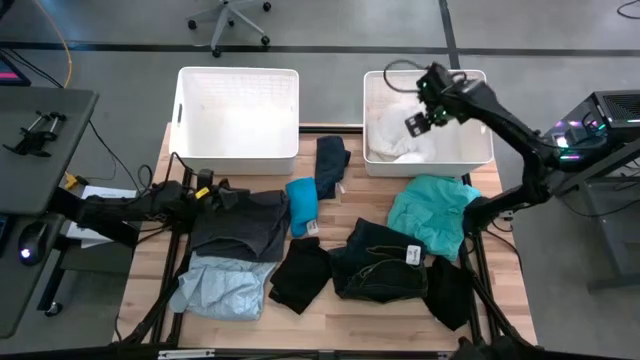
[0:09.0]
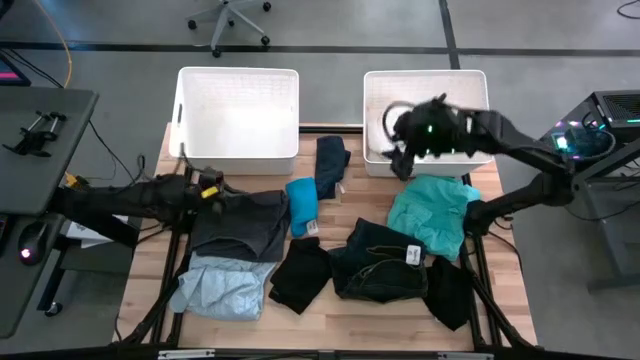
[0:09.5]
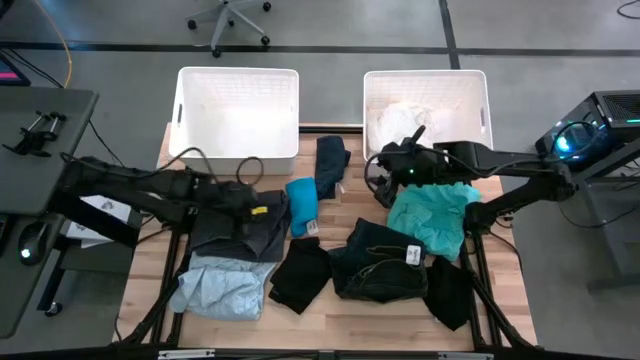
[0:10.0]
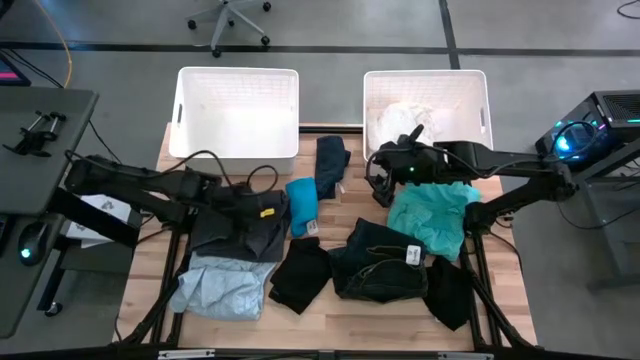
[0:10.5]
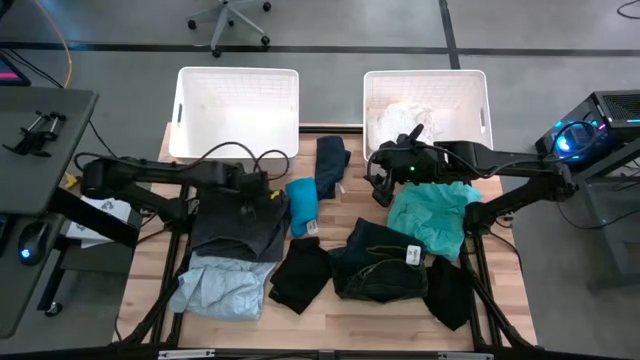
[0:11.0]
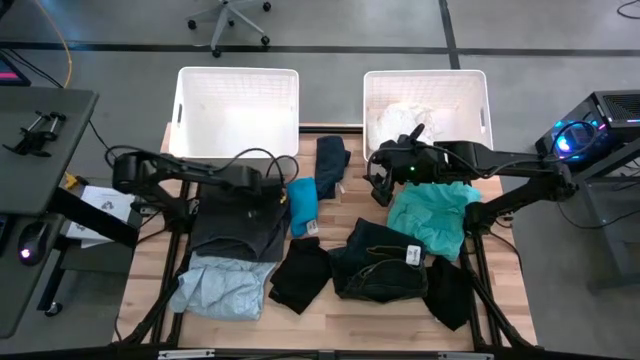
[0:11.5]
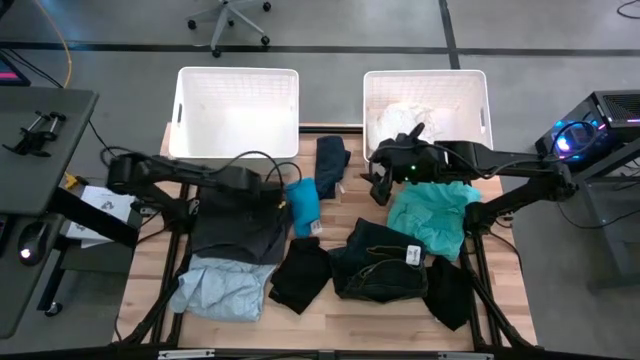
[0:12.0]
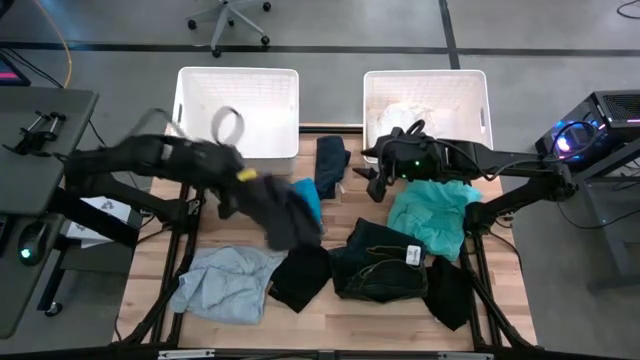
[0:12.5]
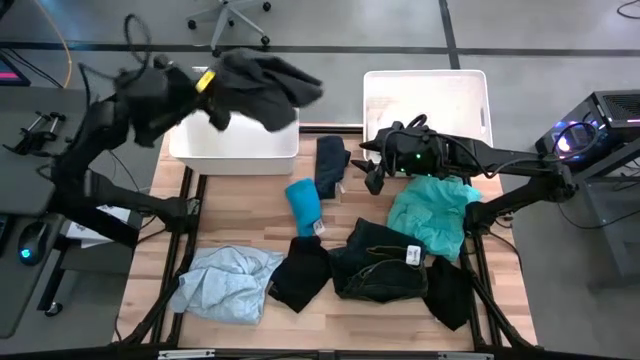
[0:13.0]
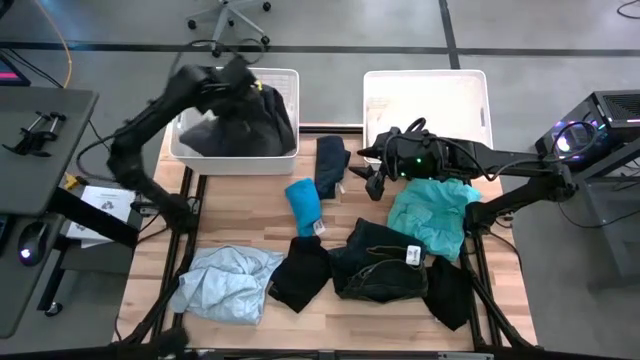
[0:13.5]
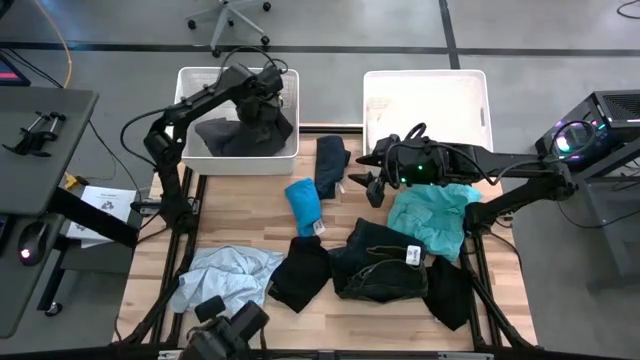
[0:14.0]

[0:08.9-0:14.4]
Task: Sort clothes
Put the black shorts into the left white laundry organizer

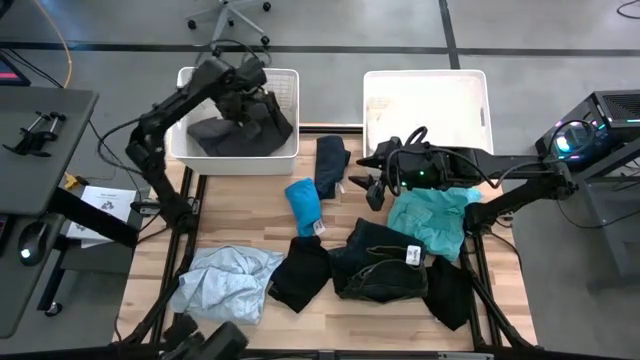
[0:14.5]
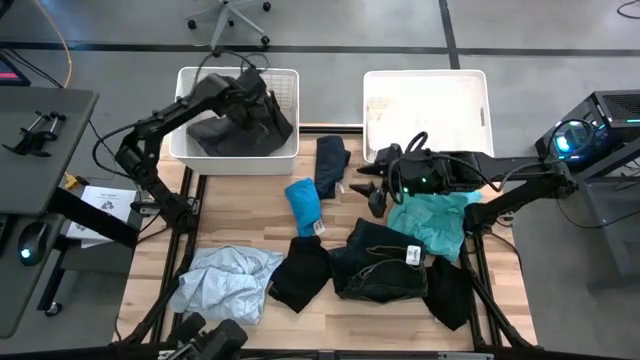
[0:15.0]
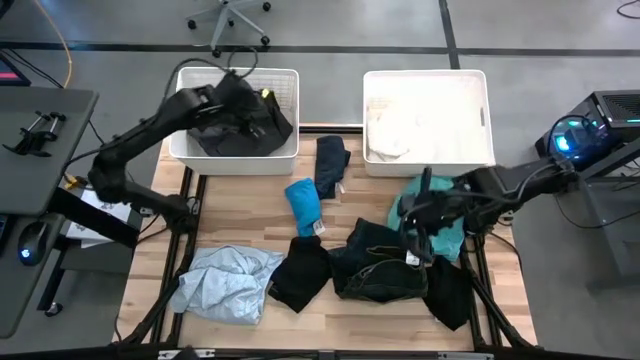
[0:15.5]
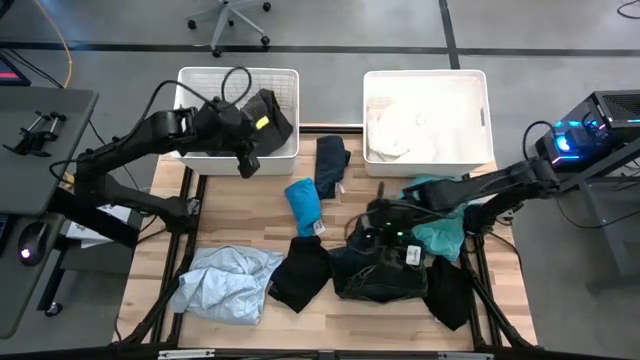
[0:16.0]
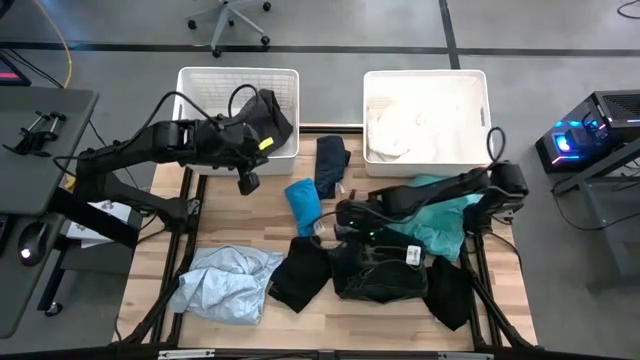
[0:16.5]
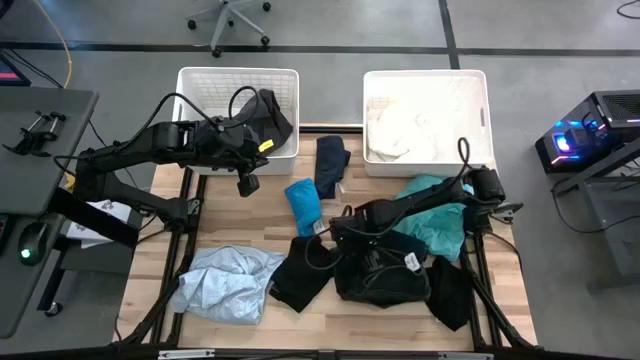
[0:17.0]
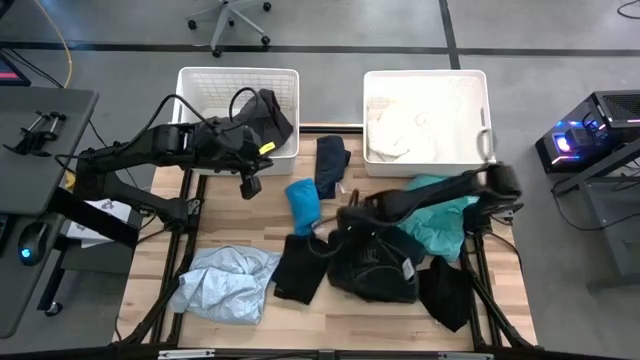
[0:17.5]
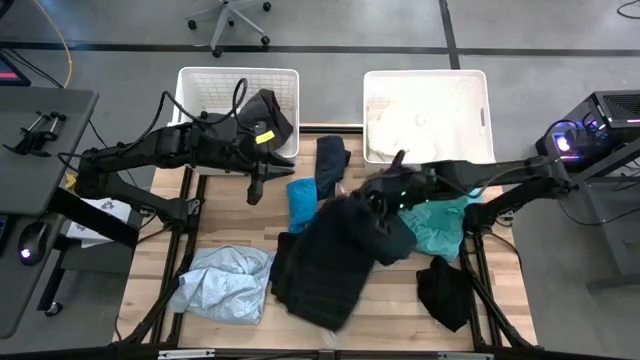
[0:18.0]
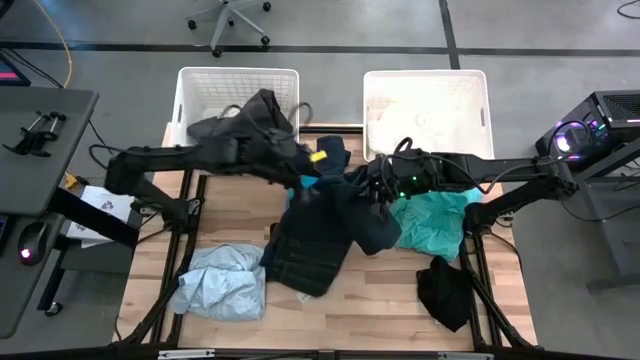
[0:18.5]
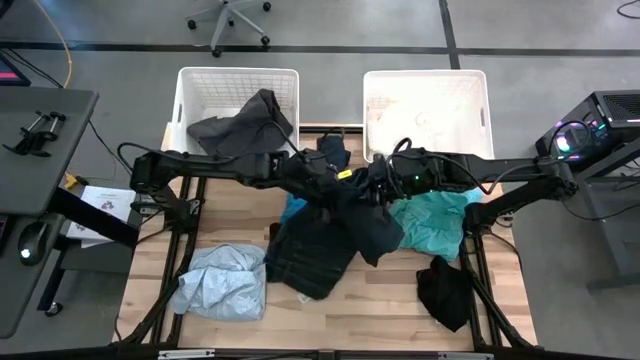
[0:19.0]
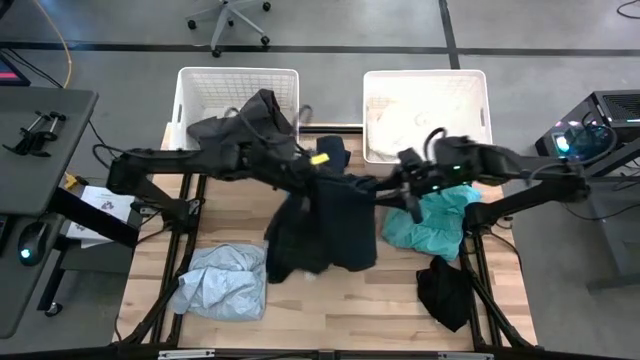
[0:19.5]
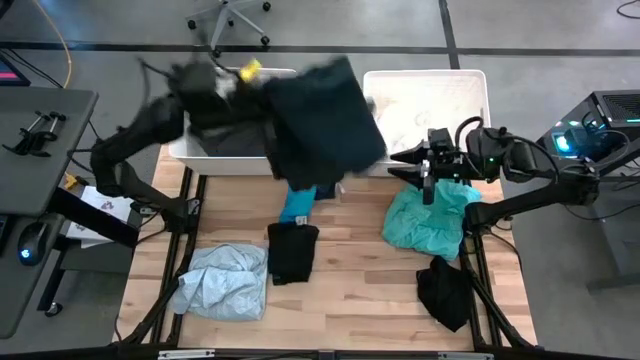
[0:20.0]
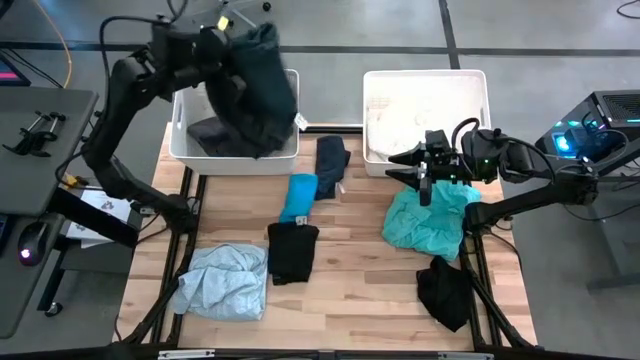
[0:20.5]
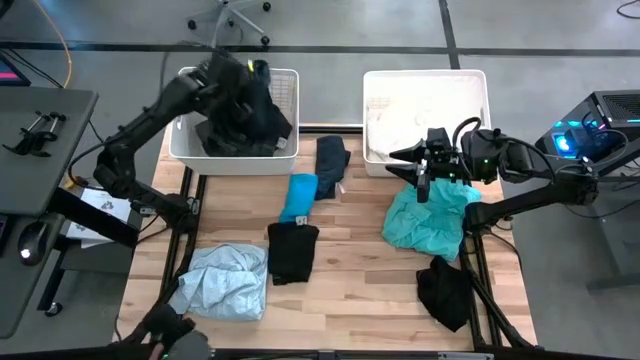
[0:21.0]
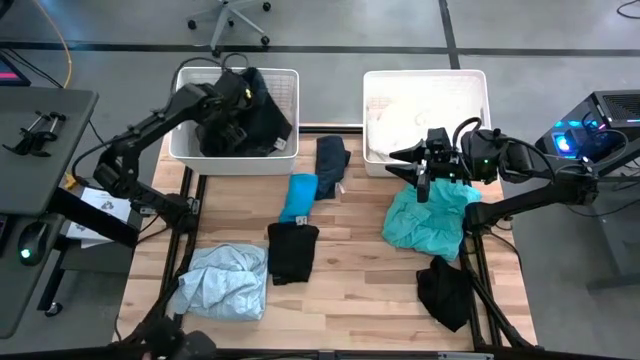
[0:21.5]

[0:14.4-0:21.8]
Put the dark blue pants into the left white laundry organizer

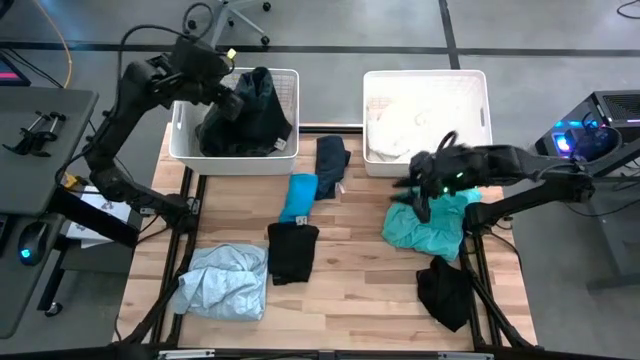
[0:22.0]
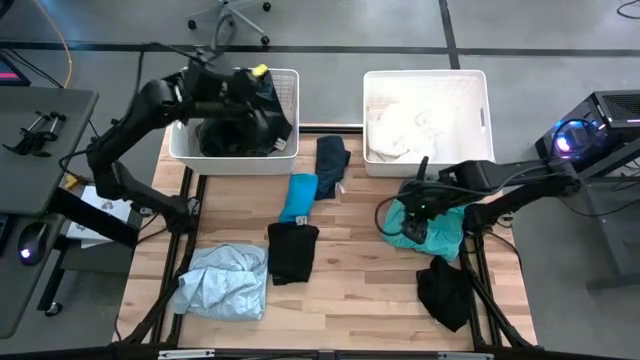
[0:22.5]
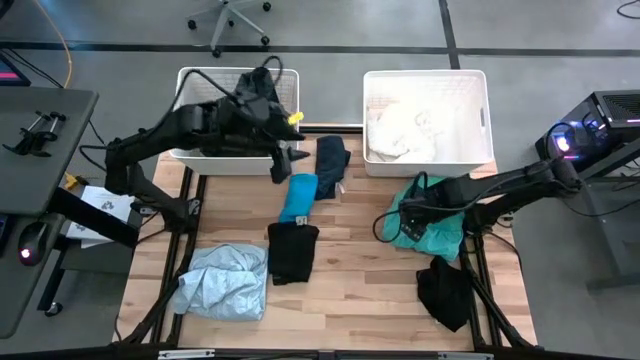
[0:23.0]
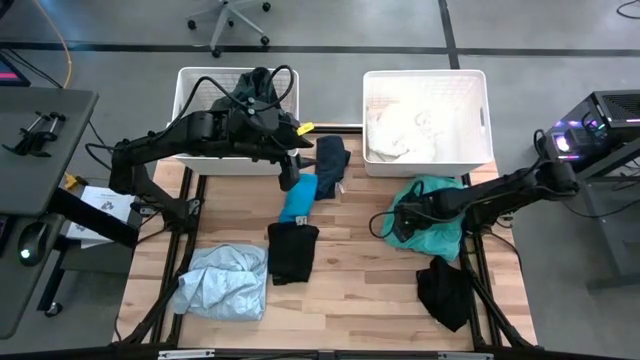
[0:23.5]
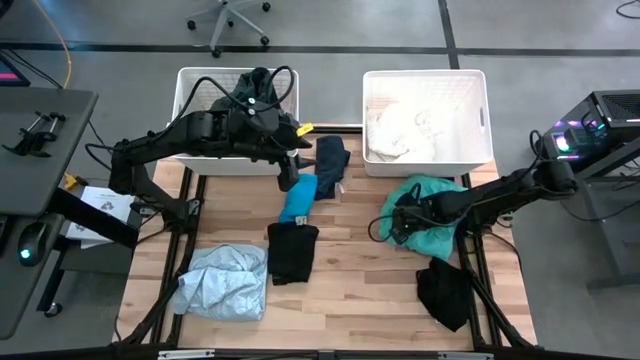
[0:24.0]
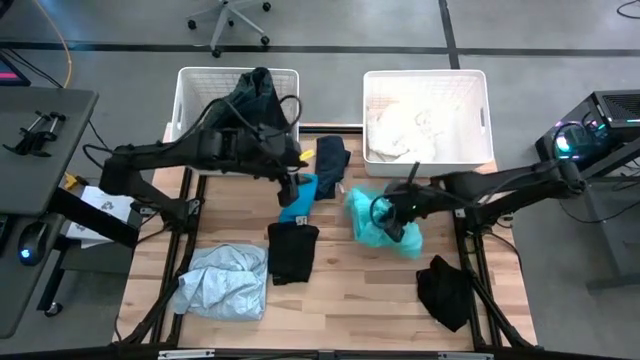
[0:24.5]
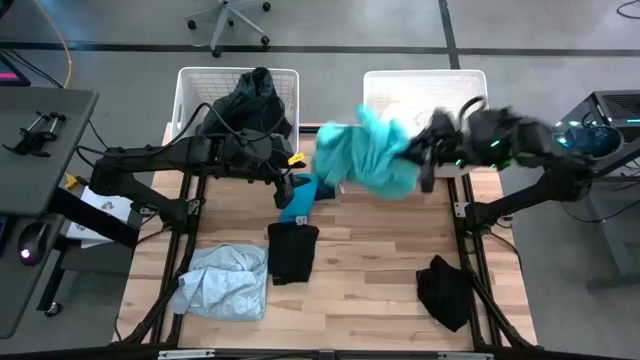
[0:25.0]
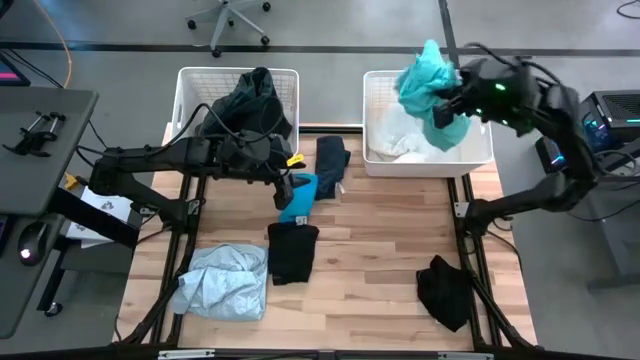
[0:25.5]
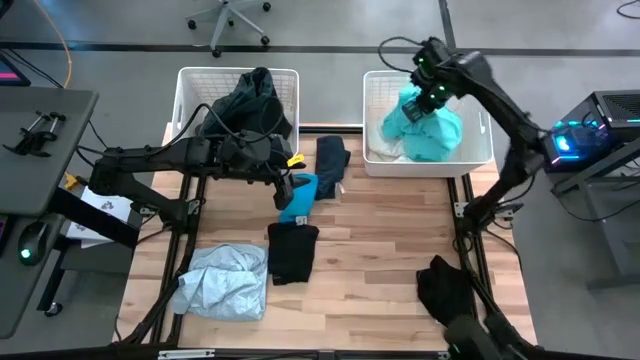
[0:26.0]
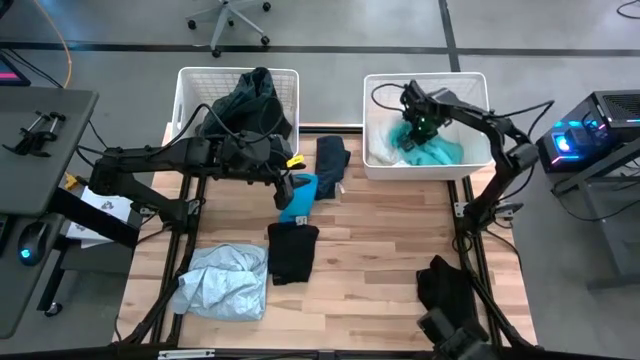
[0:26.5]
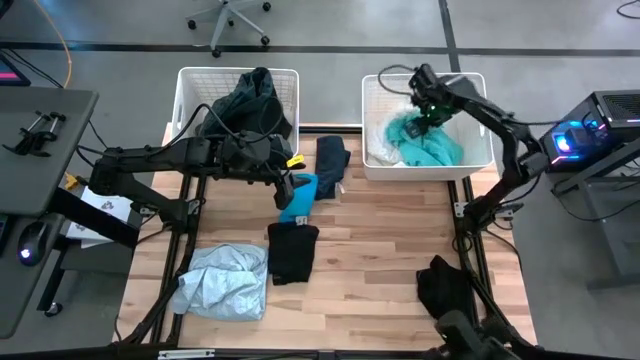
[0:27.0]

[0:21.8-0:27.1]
Put the light blue shorts into the right white laundry organizer

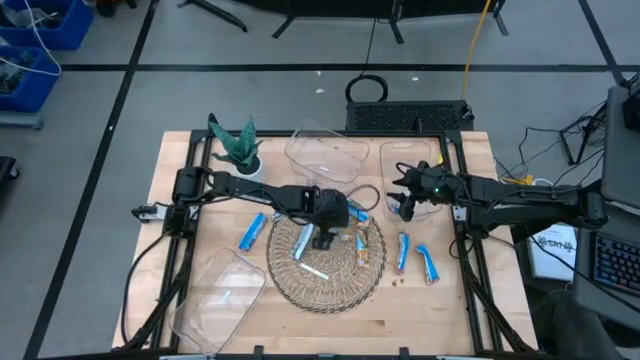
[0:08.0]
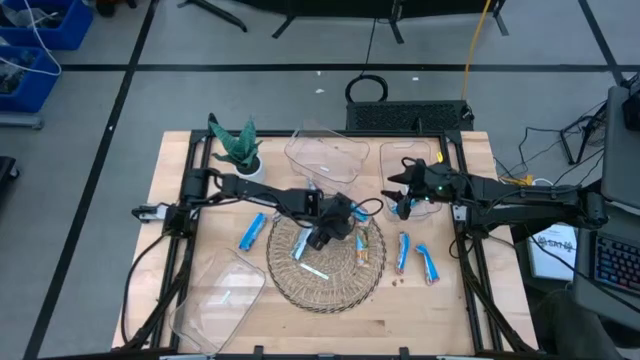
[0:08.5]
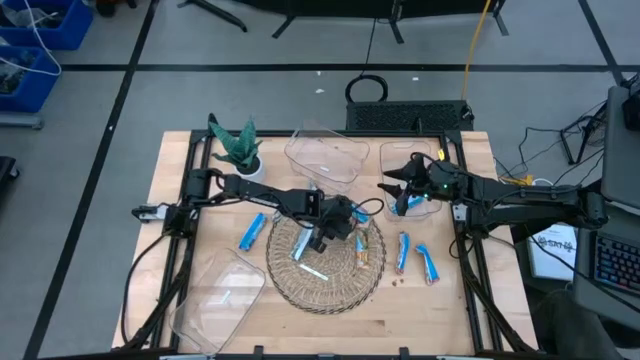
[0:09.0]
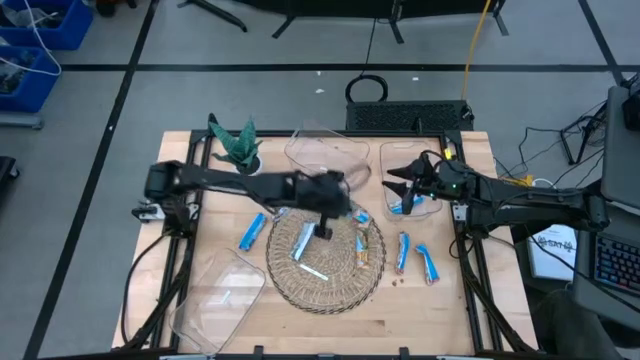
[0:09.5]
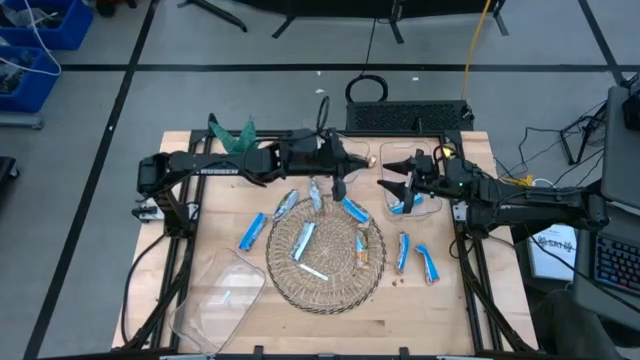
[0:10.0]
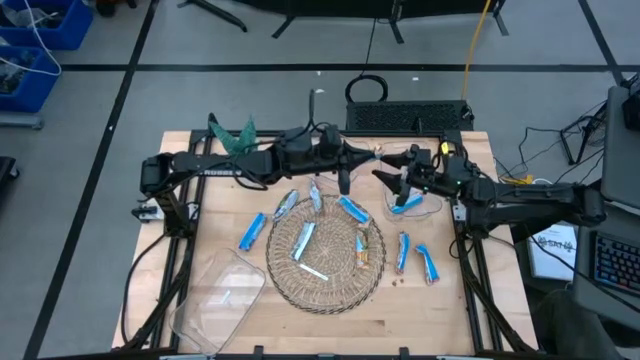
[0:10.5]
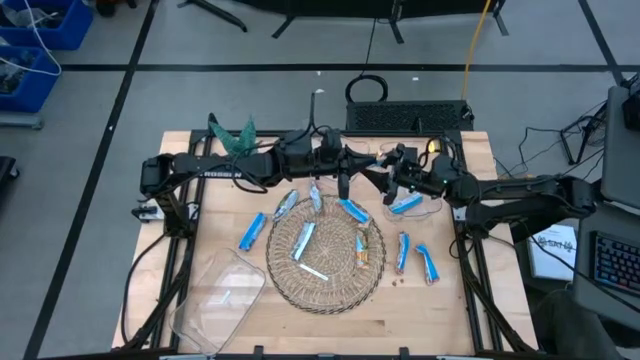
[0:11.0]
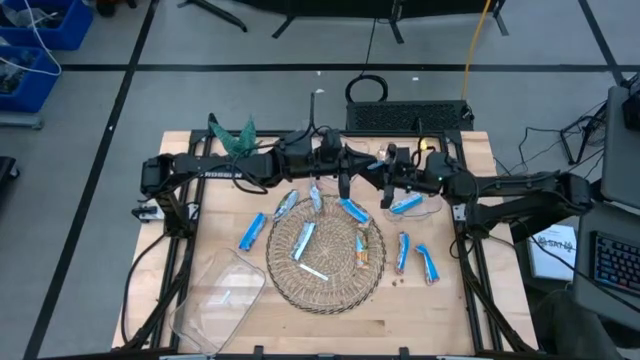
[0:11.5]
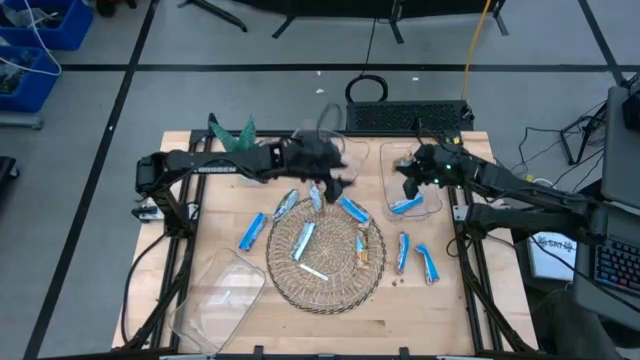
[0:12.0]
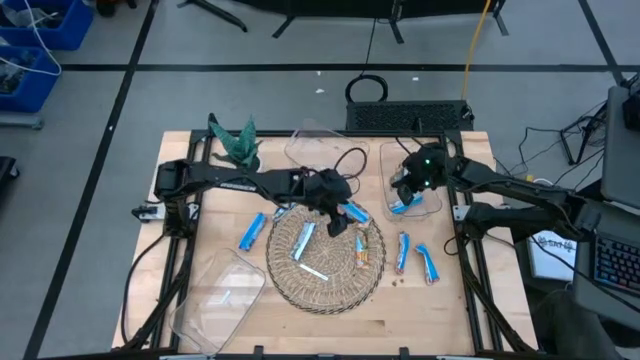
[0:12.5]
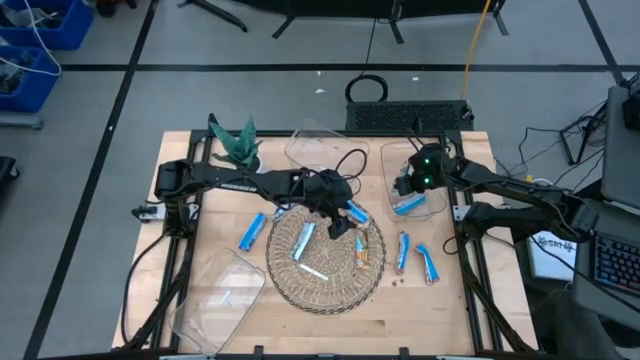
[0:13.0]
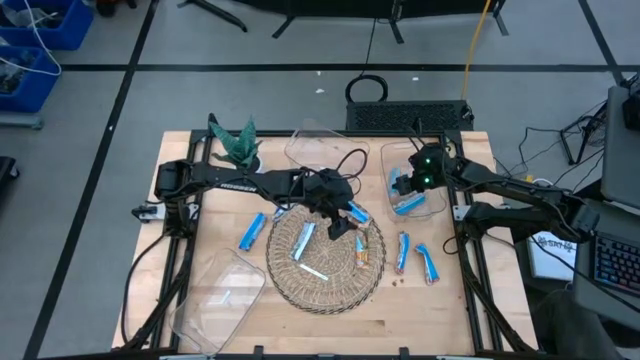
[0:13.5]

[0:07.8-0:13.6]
Task: Pick and place Granola Bars by type
Put the left yellow granola bar into the top right transparent bin
